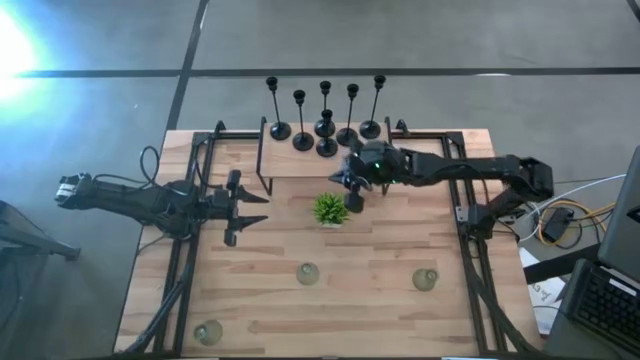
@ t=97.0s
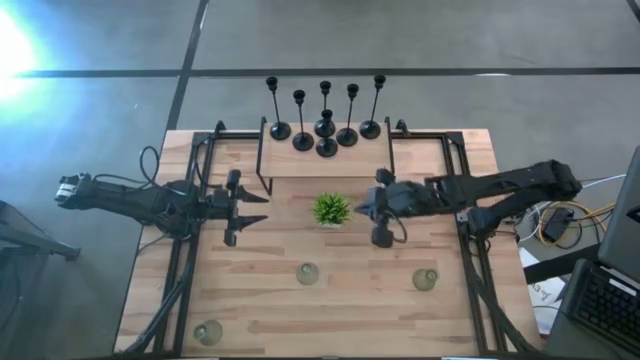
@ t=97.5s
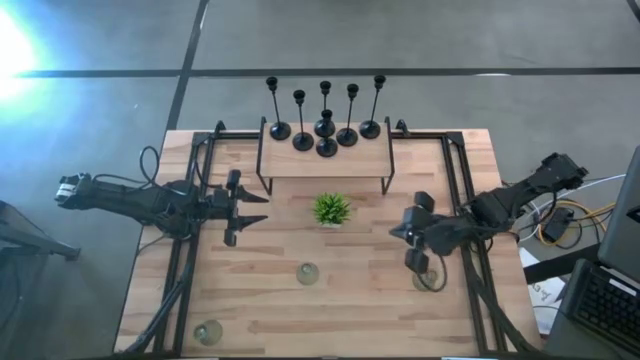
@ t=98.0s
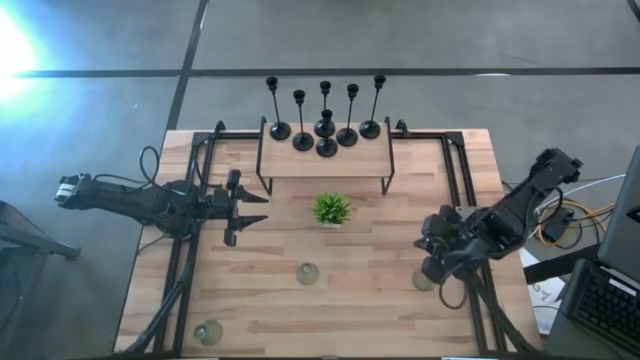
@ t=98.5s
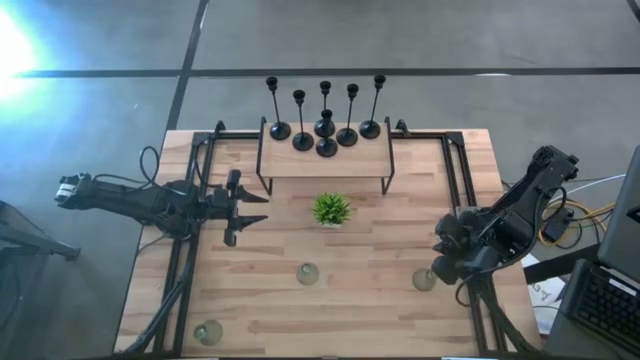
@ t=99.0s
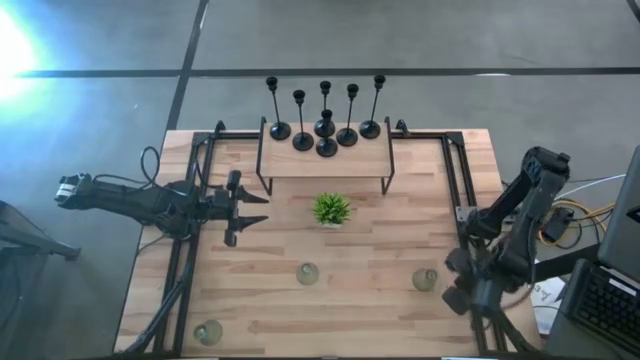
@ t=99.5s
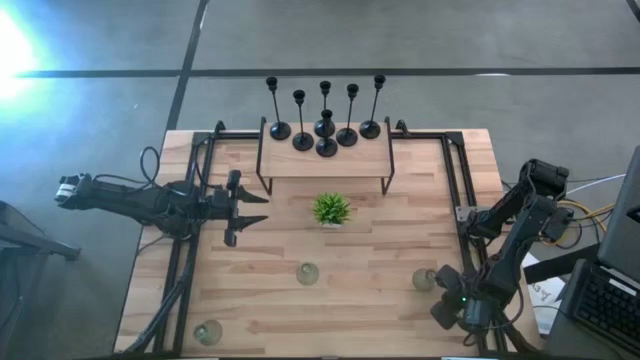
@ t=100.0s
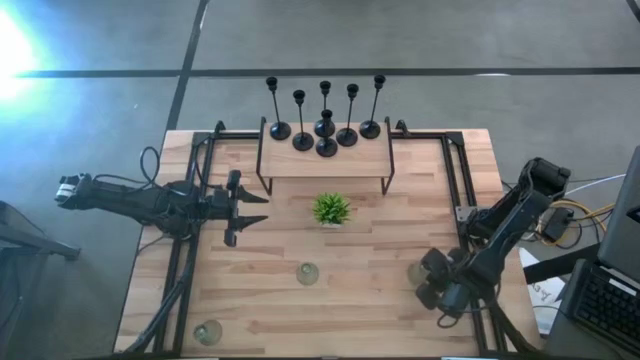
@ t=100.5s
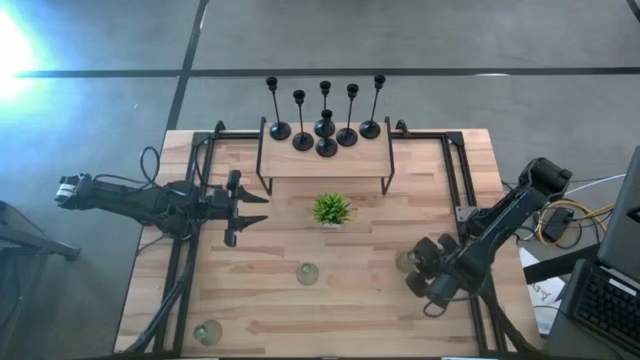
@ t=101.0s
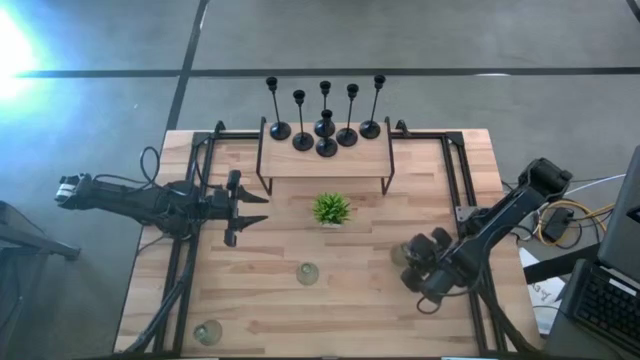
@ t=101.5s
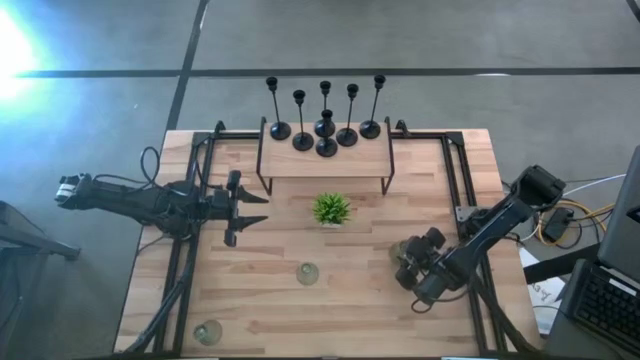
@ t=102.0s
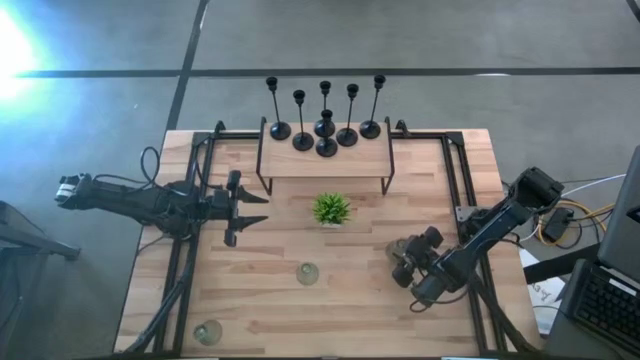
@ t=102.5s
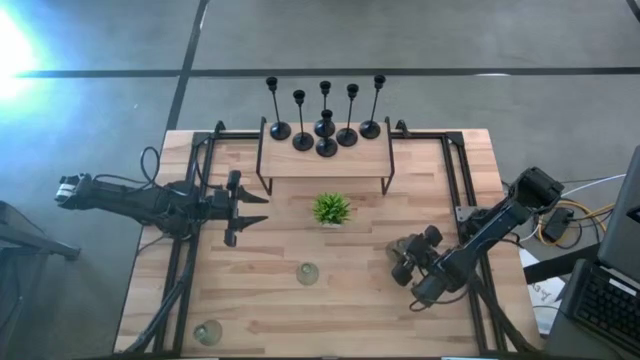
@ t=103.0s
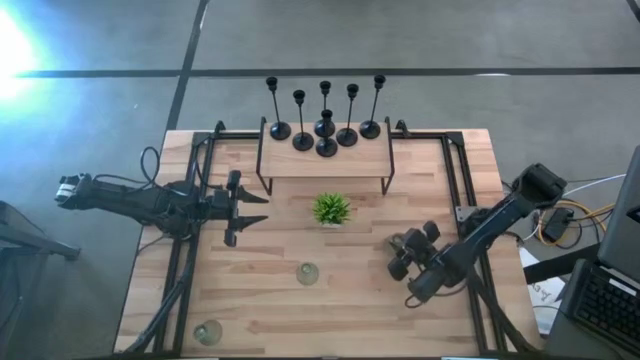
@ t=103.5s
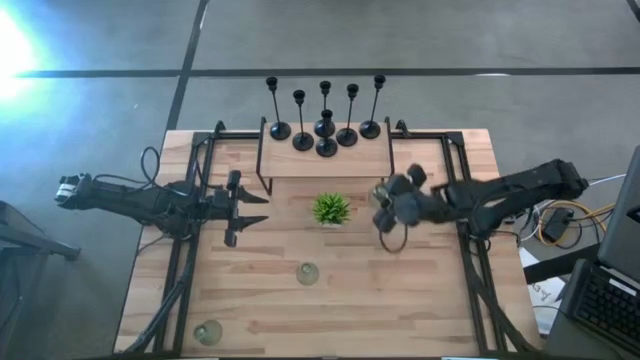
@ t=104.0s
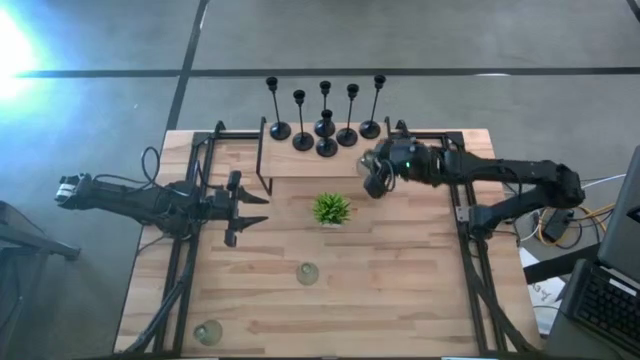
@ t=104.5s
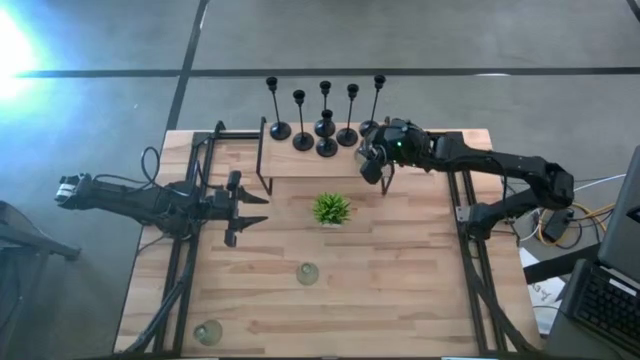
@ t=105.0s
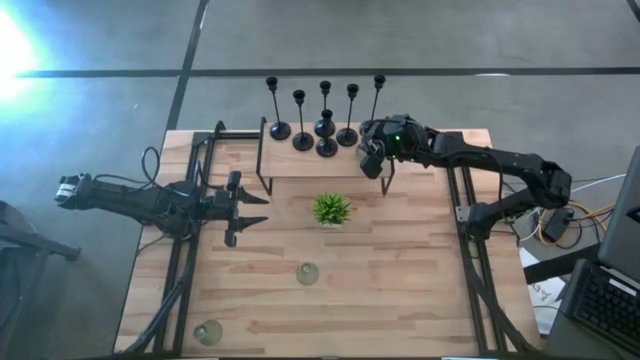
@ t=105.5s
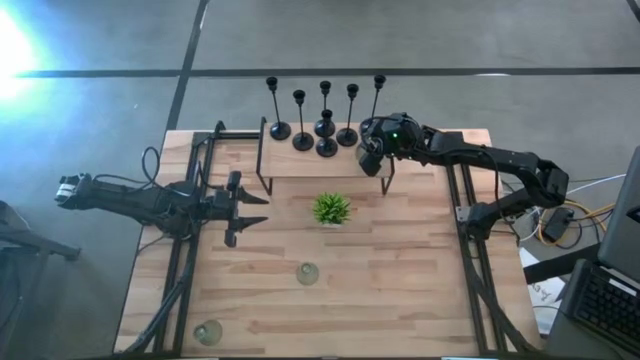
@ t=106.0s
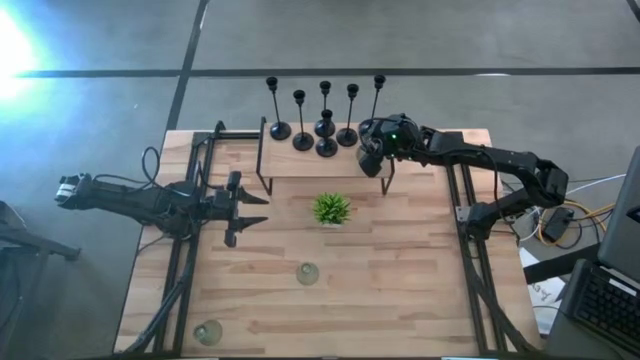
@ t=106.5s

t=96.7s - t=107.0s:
Task: Pick & Place candle stick holders
Put the transparent glass candle holder on the shelf

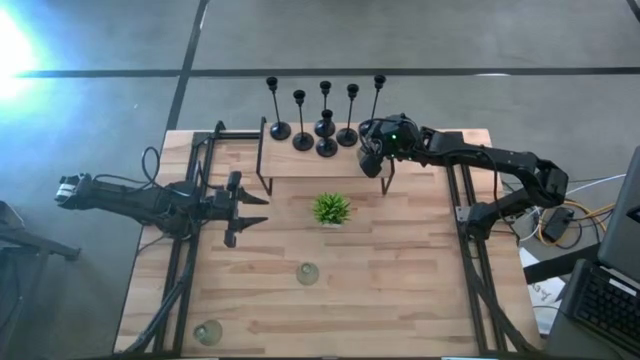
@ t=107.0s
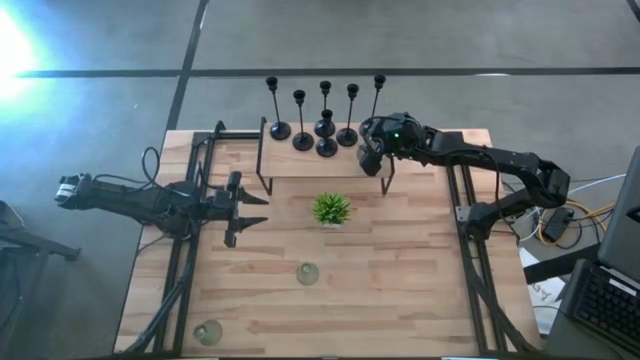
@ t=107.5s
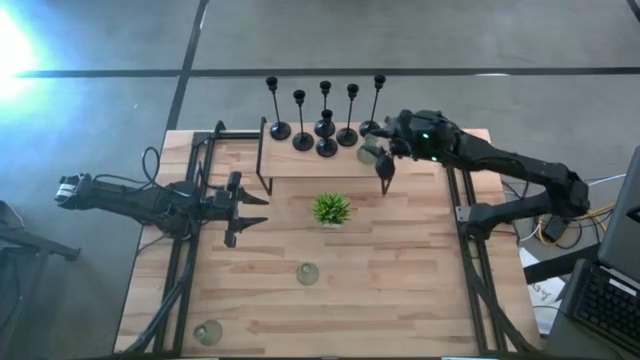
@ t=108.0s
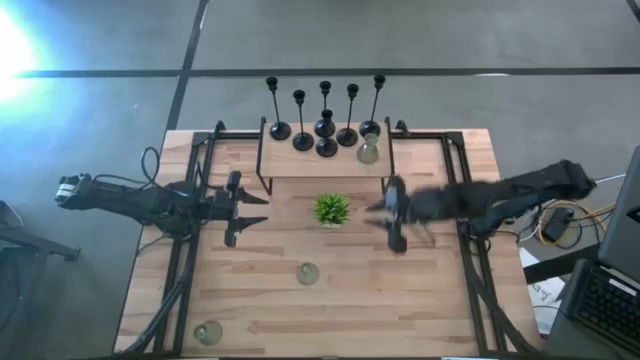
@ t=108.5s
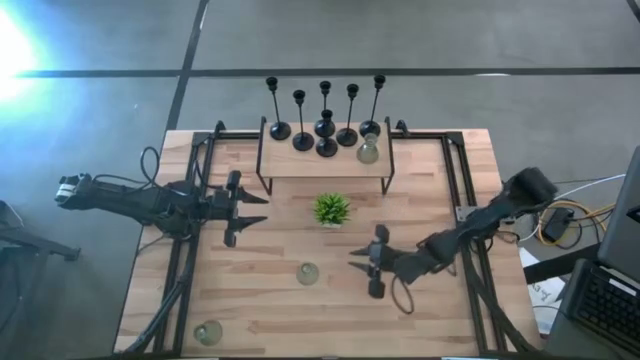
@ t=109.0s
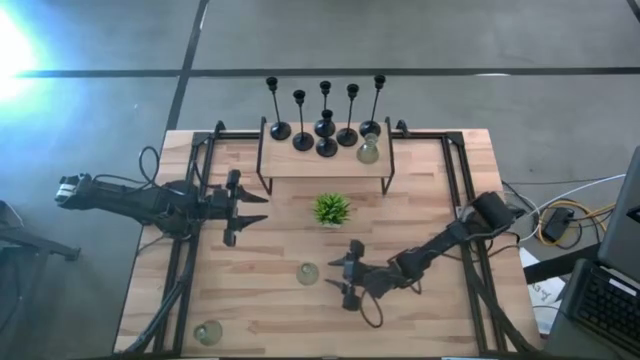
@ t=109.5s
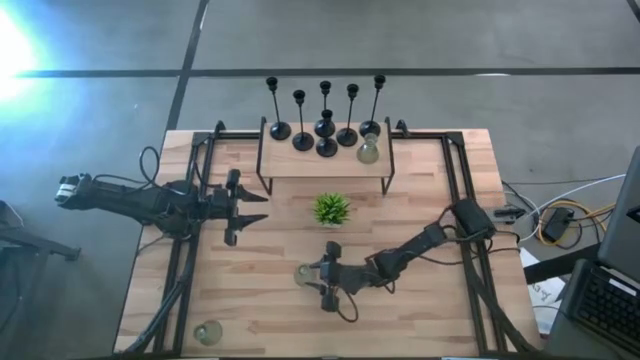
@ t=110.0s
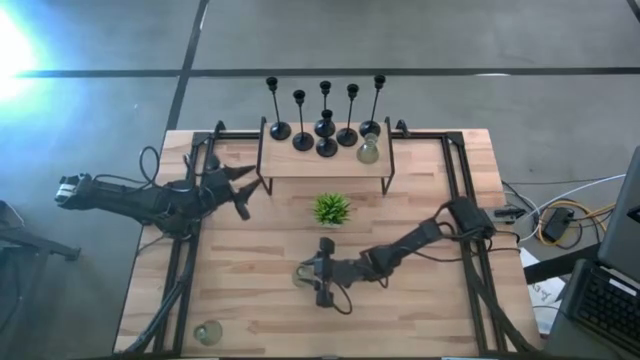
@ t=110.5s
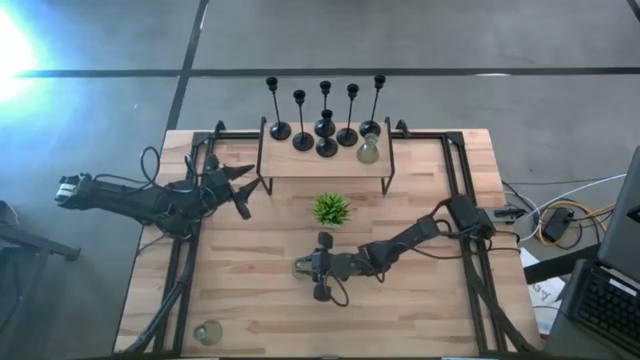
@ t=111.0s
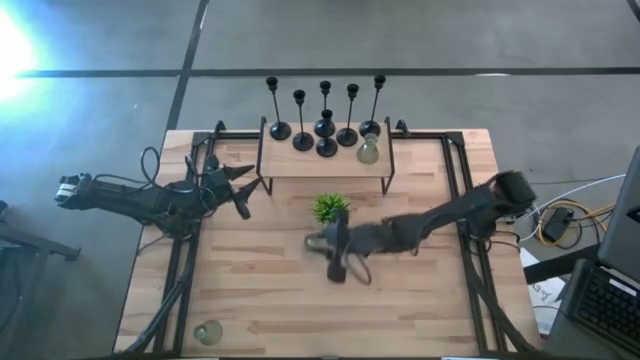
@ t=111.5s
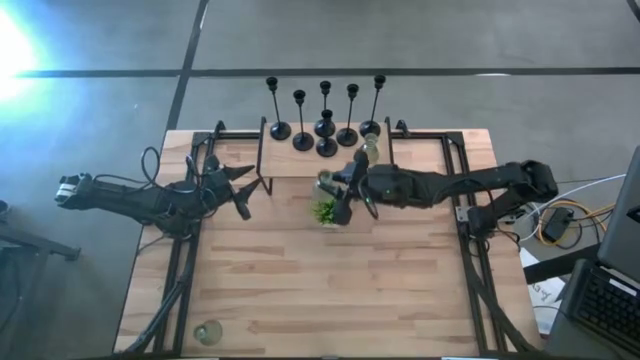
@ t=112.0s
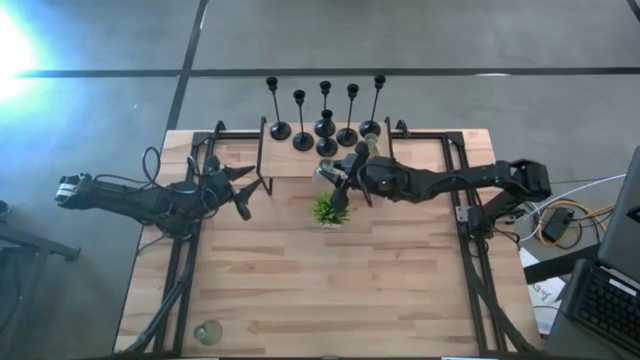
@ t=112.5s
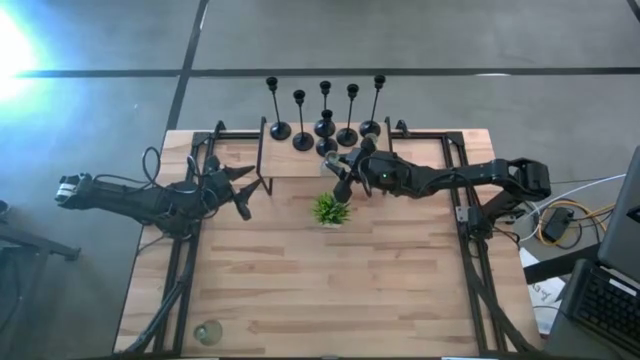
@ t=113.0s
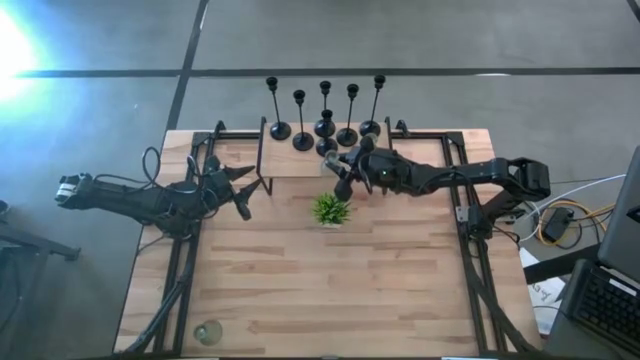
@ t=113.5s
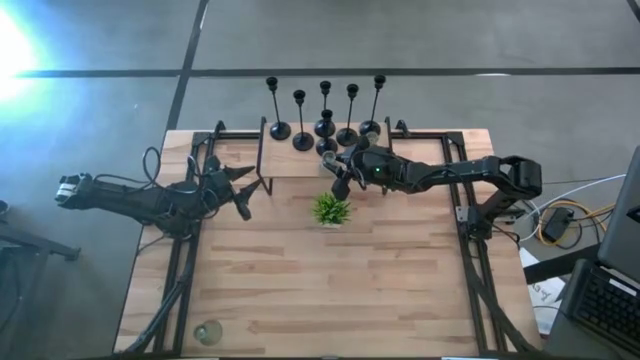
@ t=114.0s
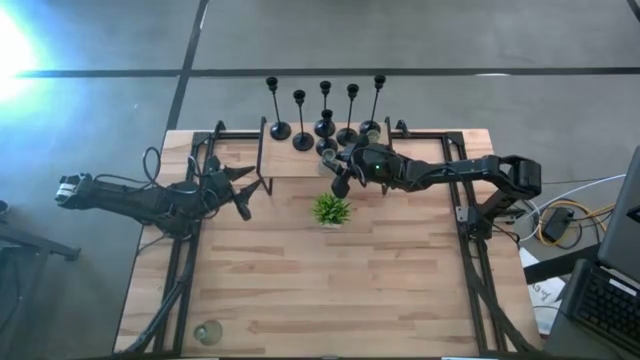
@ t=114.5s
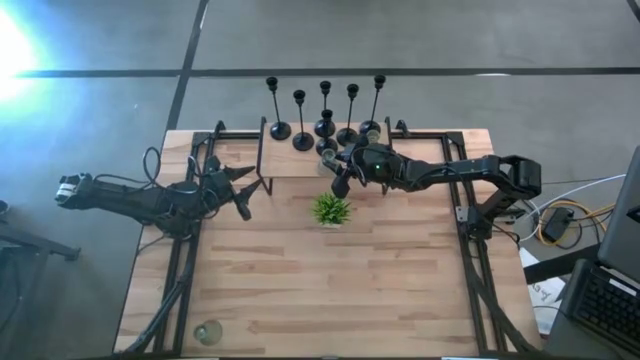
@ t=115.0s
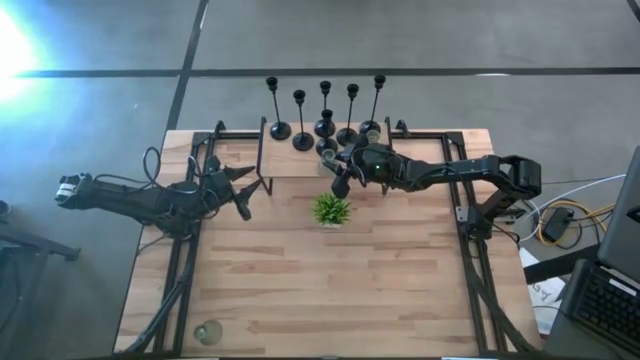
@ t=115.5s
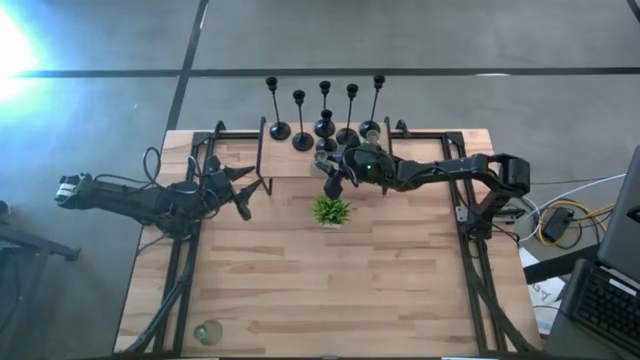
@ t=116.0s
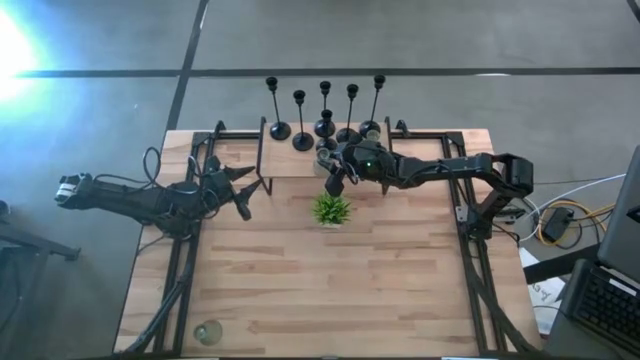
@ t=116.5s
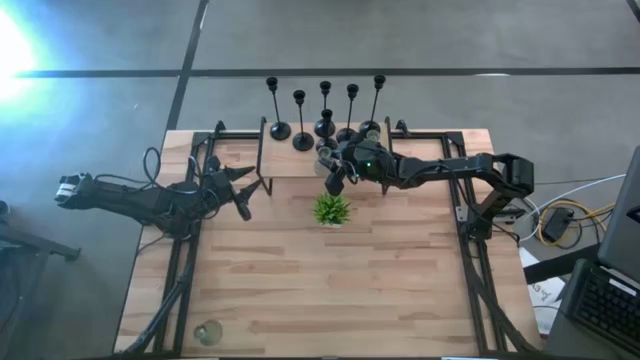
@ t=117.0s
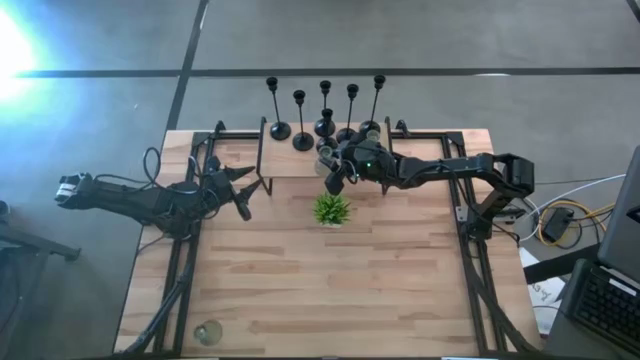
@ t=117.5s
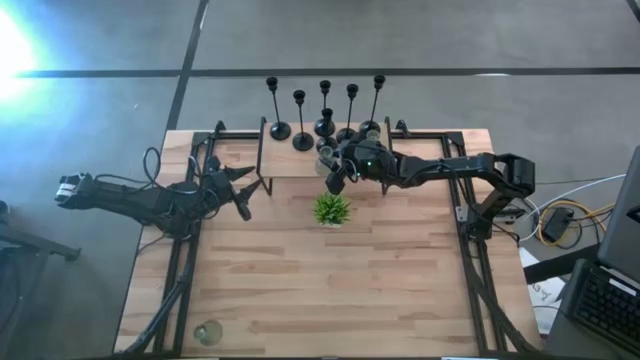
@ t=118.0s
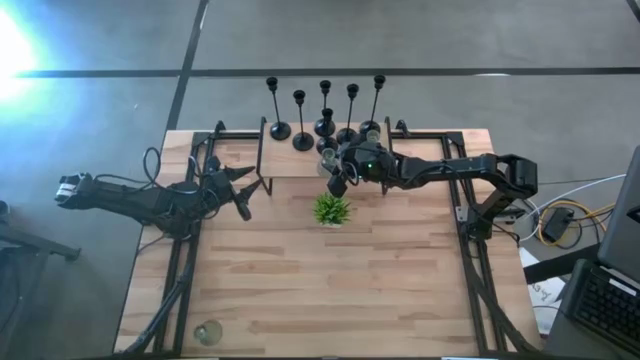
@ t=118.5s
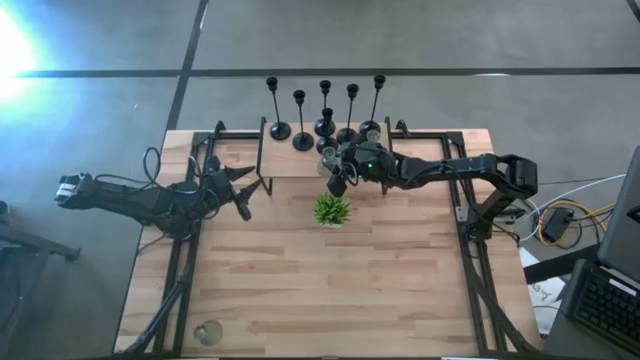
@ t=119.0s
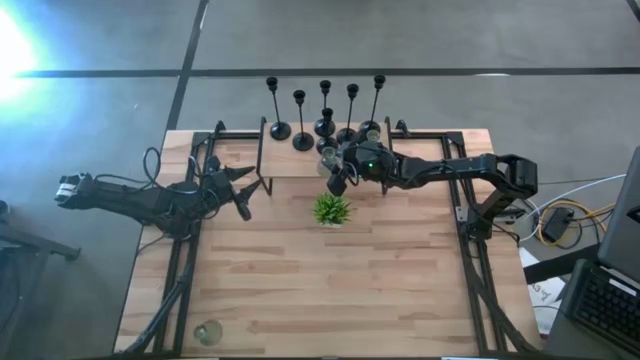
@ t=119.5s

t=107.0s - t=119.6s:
Put the transparent glass candle holder on the shelf
